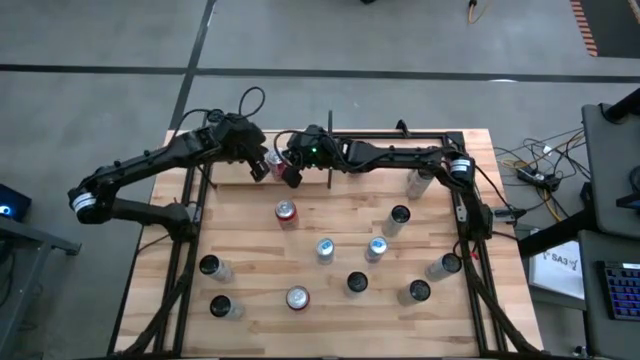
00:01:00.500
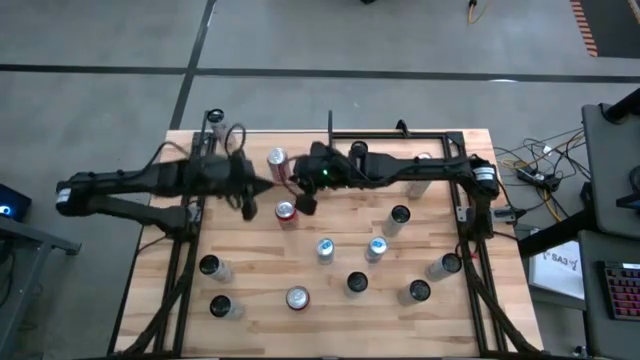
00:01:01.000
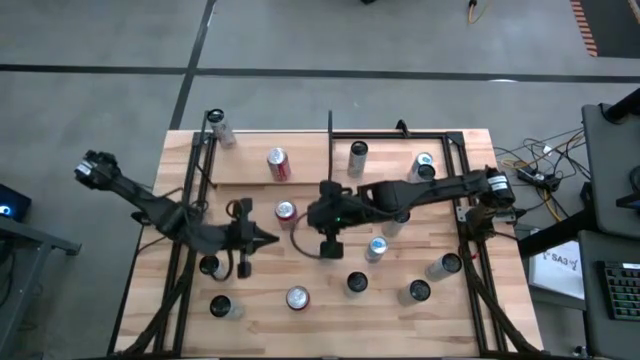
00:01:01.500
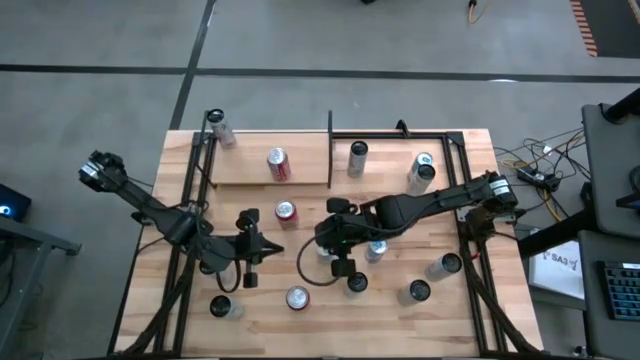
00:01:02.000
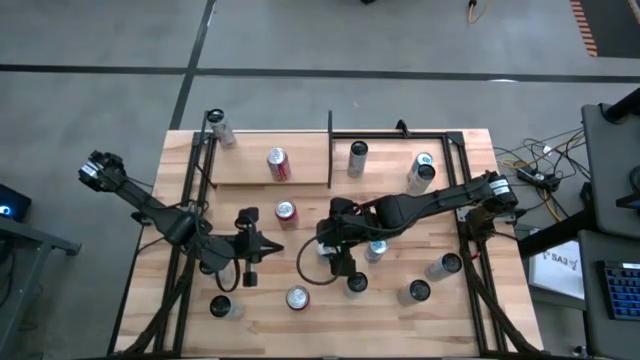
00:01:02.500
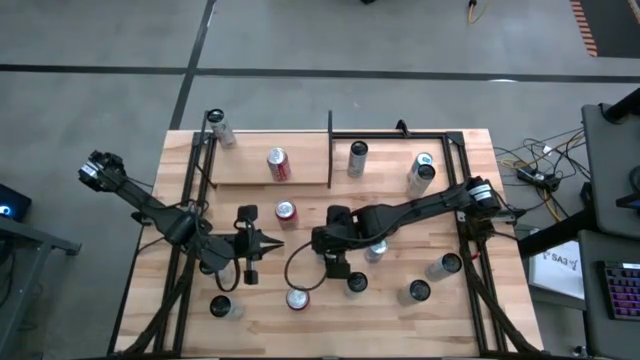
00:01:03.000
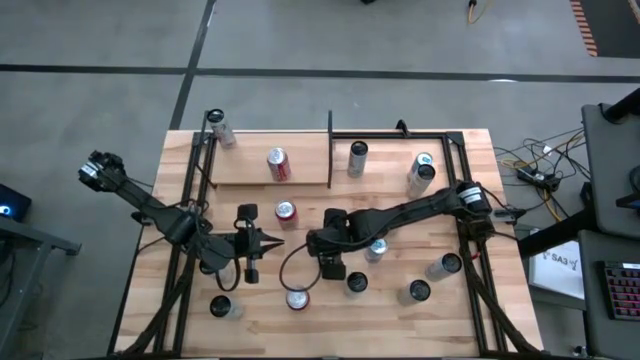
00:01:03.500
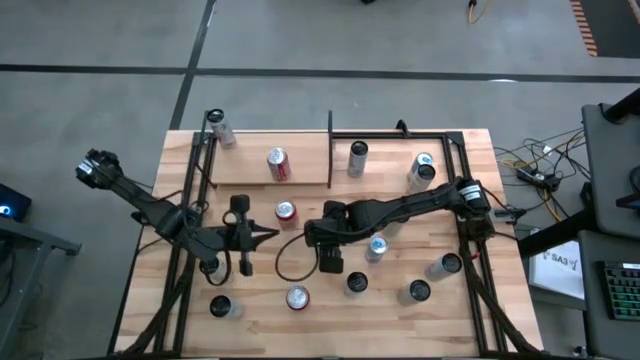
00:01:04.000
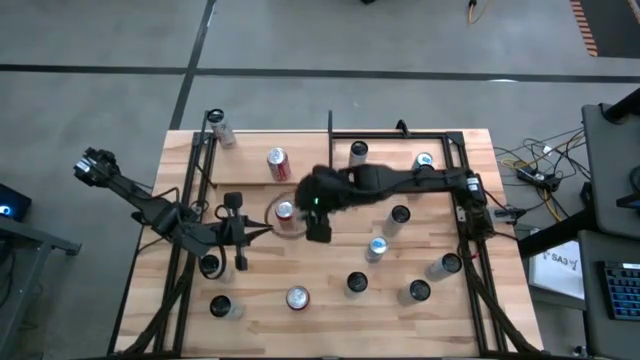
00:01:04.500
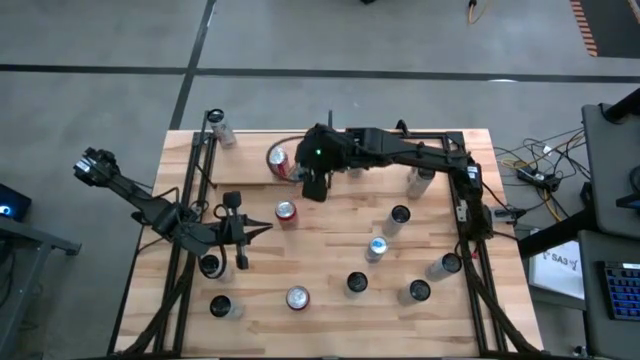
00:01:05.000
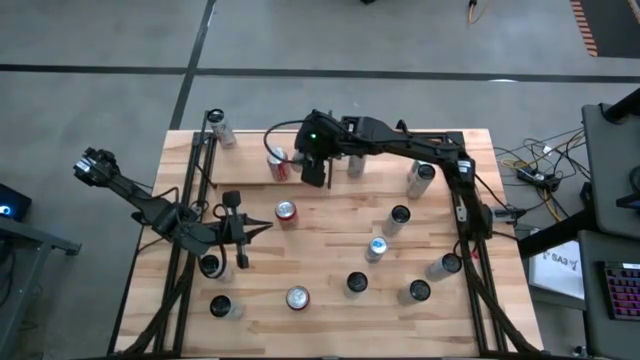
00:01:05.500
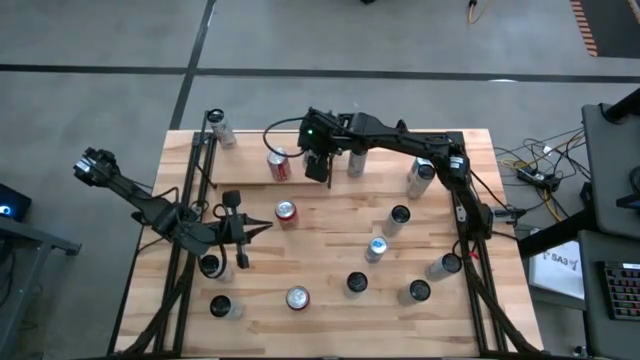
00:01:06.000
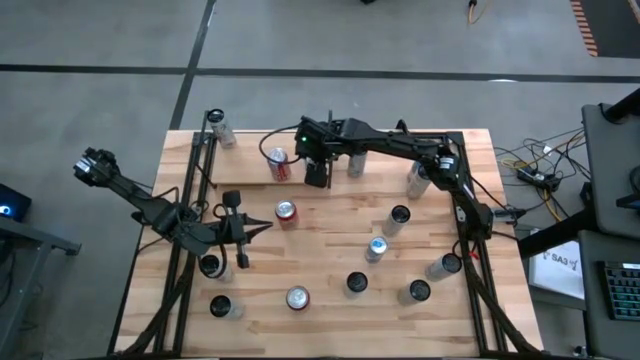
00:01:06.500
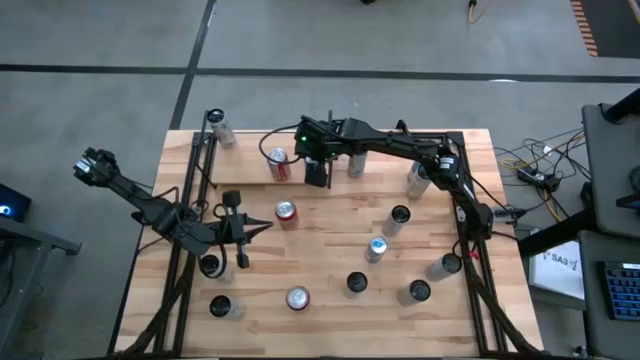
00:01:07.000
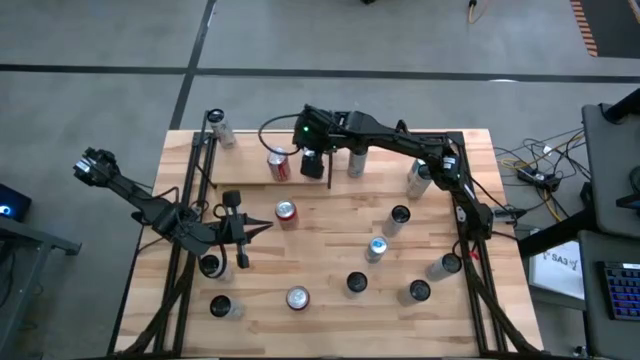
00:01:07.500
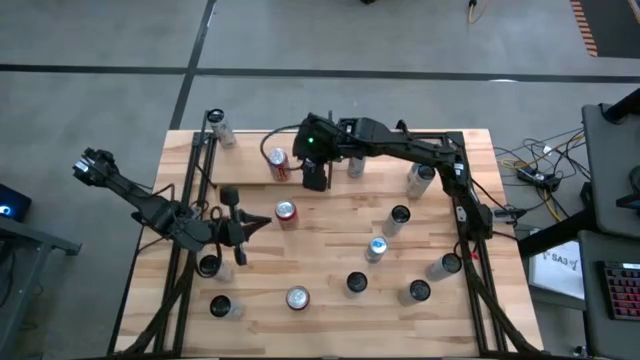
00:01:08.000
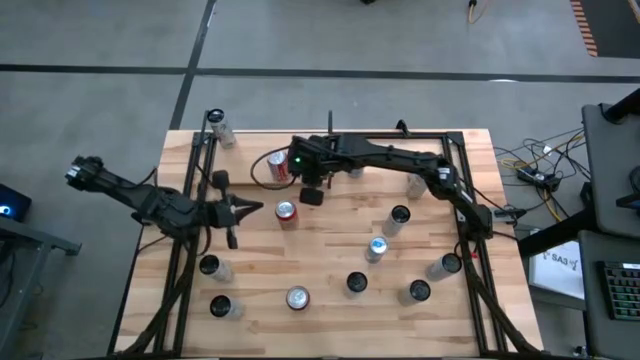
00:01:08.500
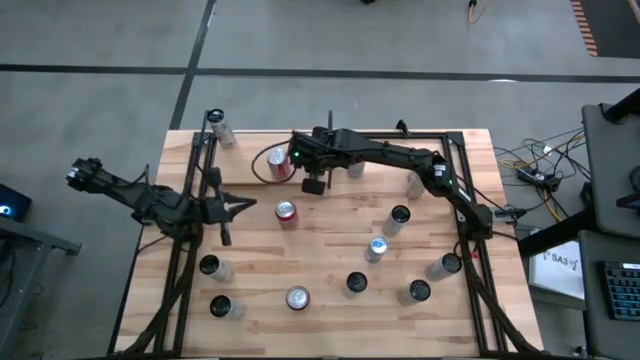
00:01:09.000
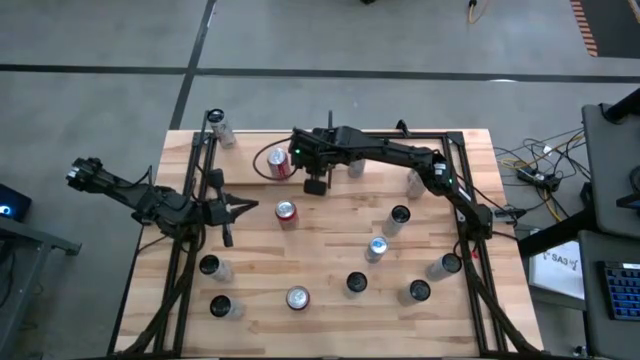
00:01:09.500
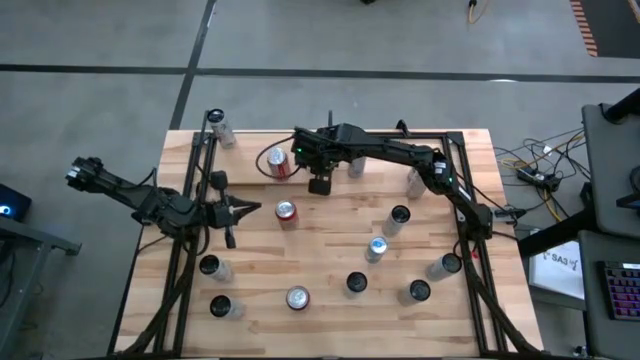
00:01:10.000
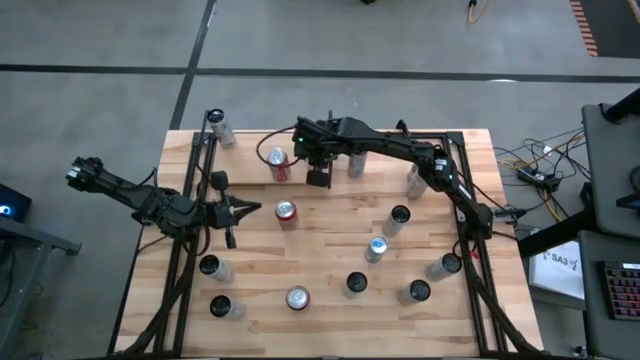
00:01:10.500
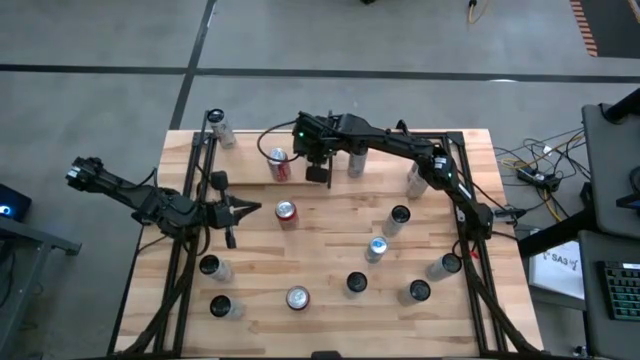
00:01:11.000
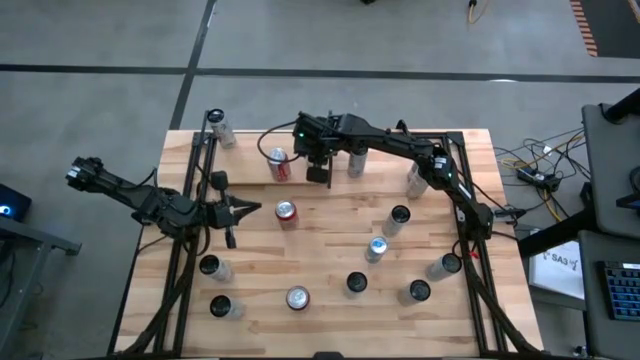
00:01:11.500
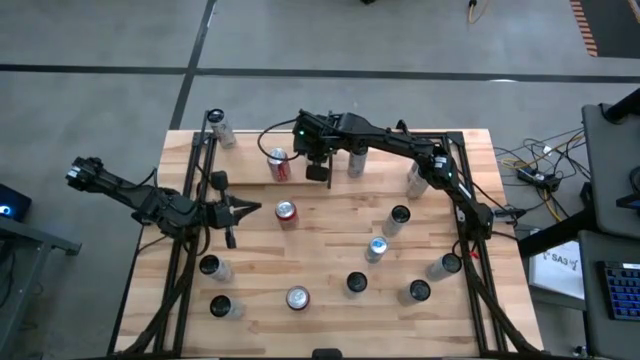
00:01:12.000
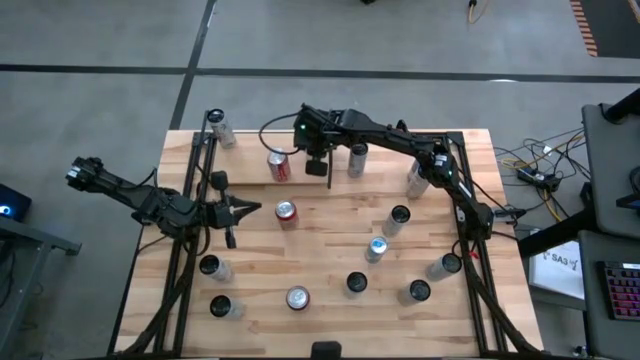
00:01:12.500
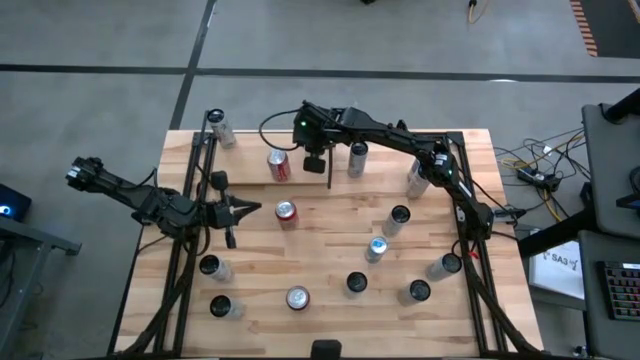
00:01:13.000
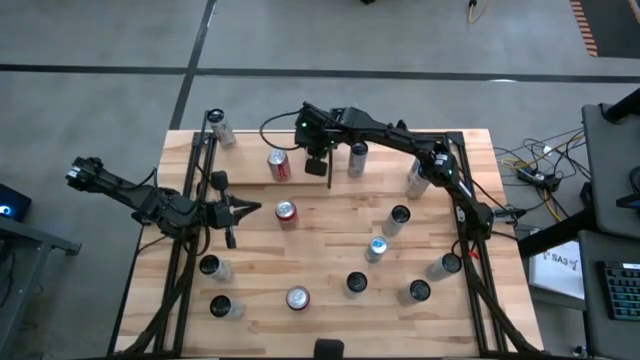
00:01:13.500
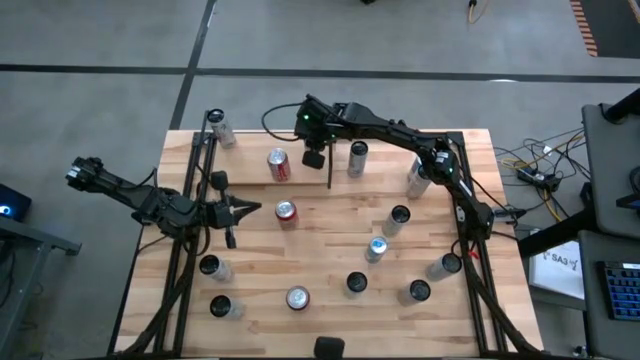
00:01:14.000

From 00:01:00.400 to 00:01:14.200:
Task: Place canned beverage on shelf
Put the bottom left blue and silver soda can on the shelf

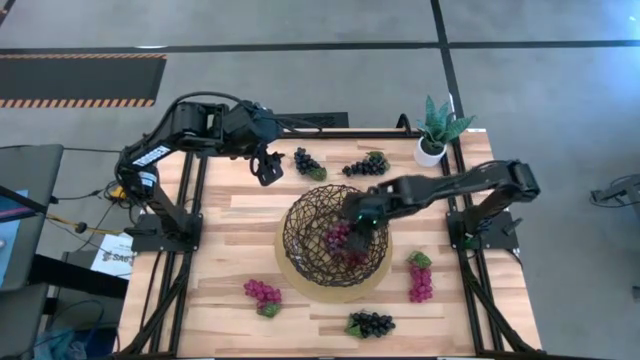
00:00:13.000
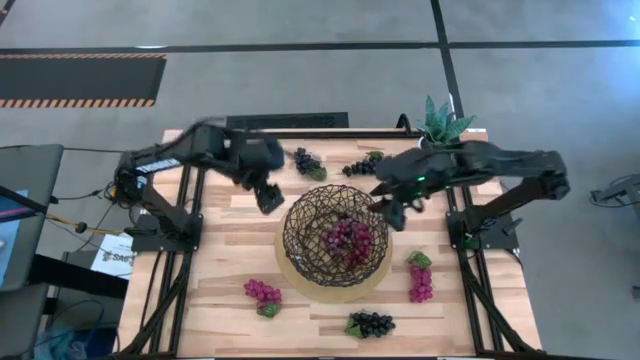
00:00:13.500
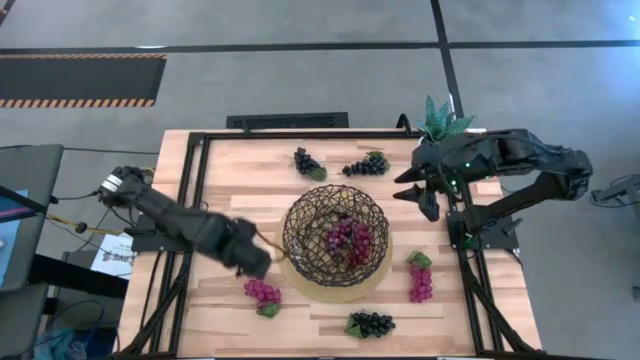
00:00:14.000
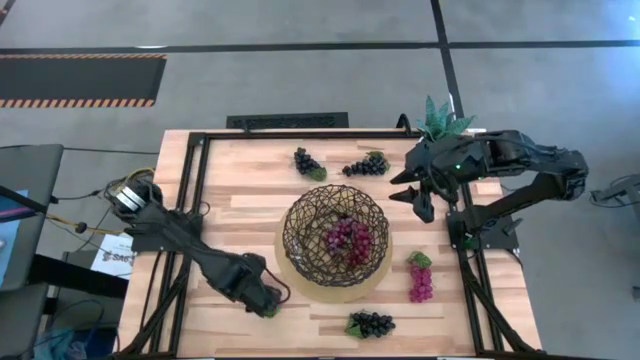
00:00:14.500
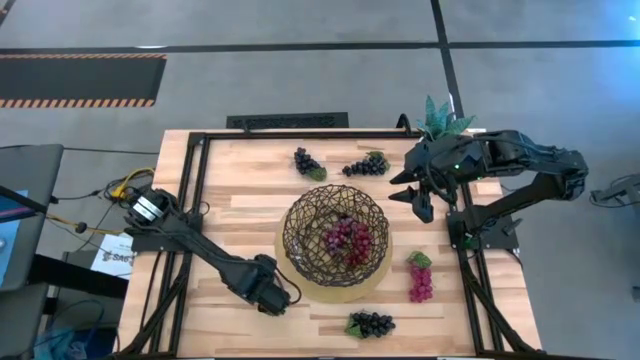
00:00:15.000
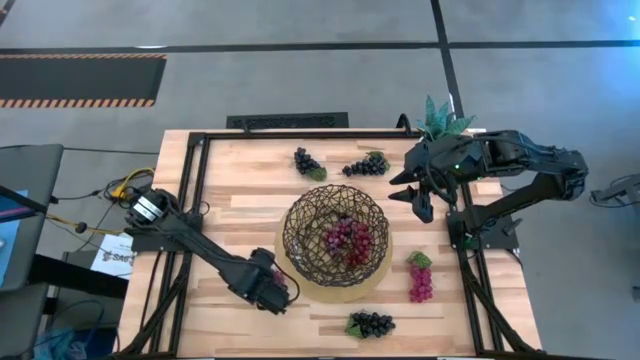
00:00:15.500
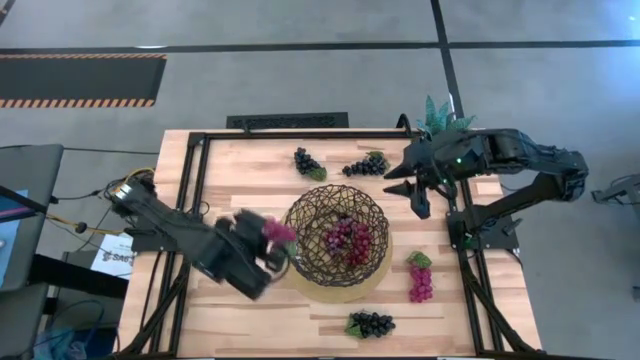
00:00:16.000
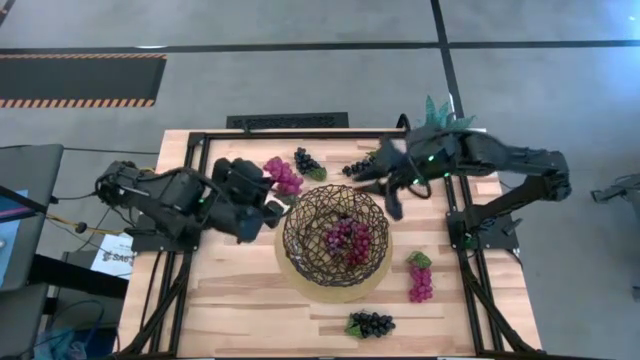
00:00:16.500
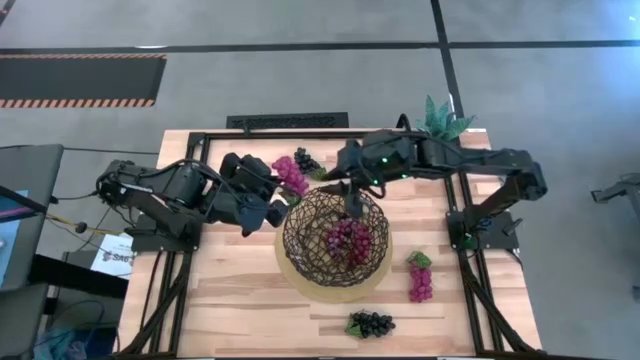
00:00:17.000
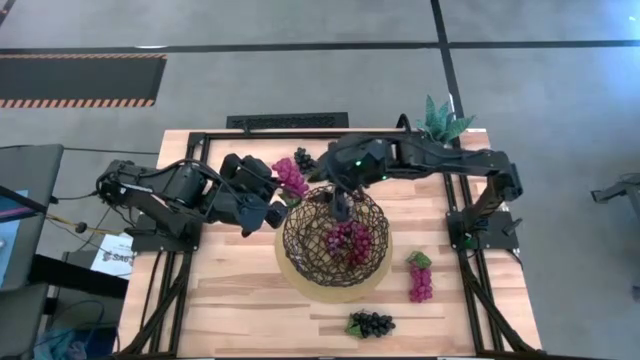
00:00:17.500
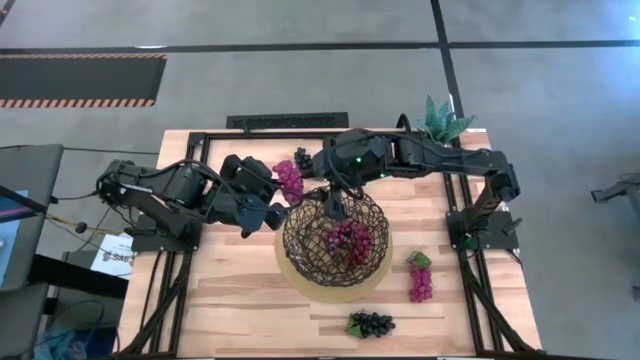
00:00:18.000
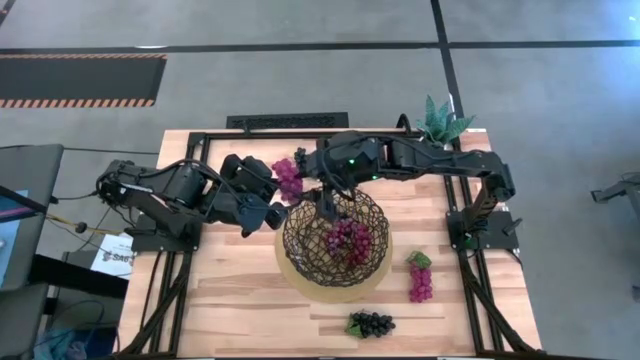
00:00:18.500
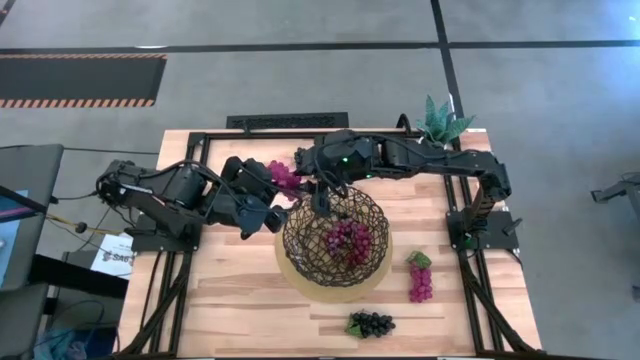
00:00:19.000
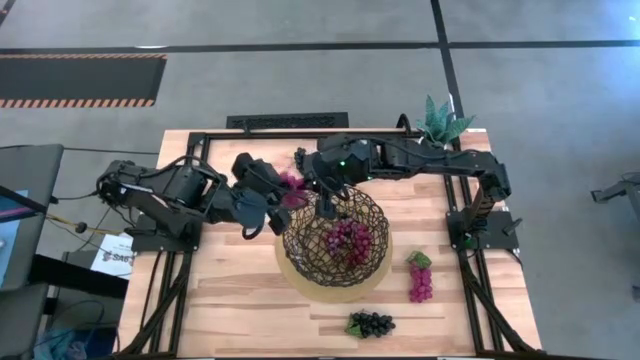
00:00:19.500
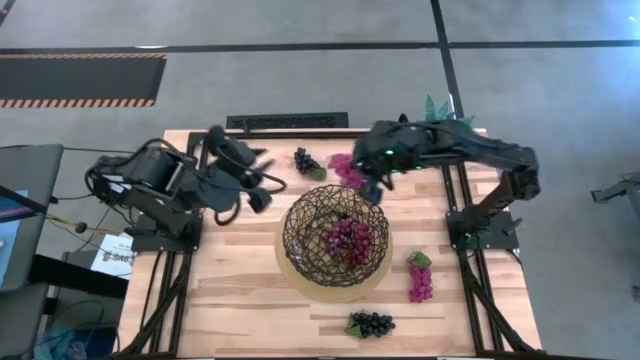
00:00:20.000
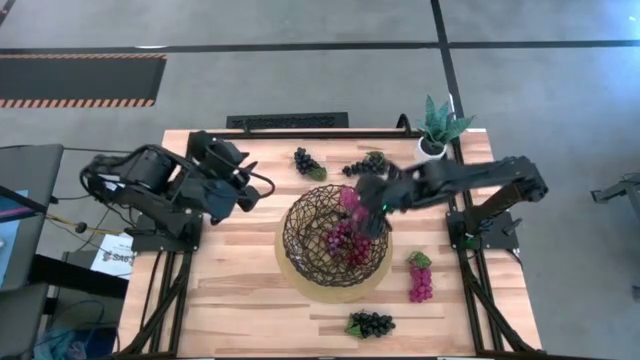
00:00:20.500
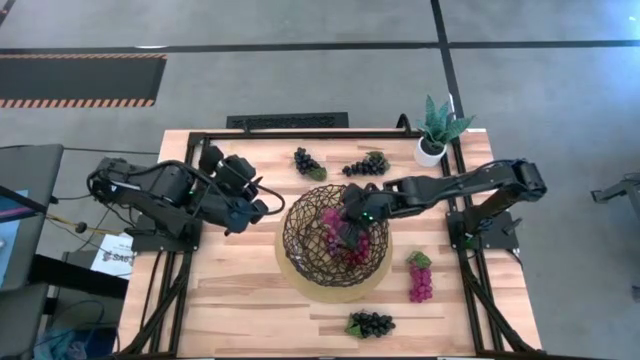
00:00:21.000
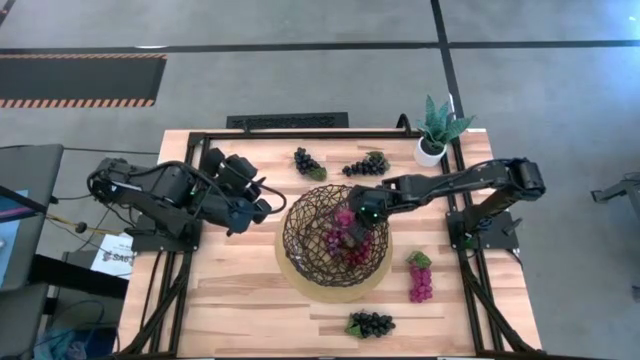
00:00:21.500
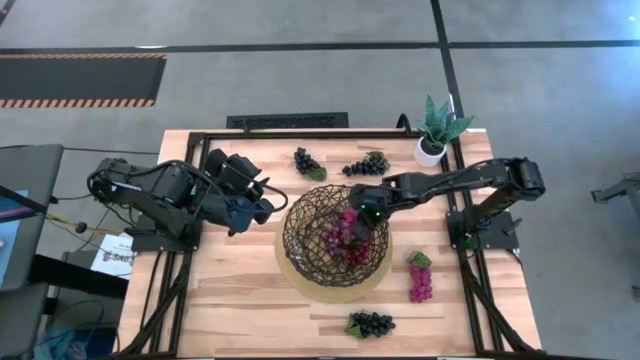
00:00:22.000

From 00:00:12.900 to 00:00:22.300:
Task: Build produce basket
Put the left pink grapes into the black wire basket
